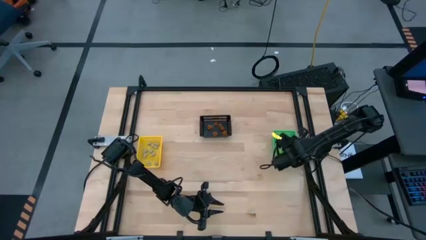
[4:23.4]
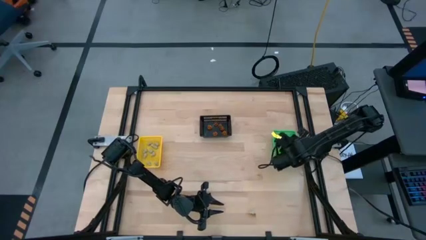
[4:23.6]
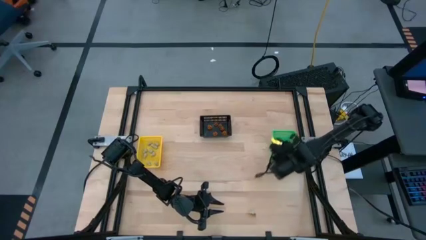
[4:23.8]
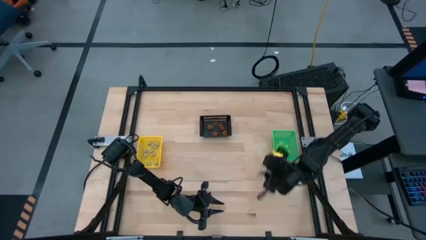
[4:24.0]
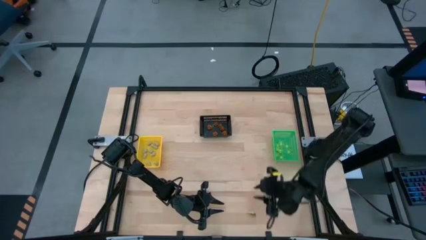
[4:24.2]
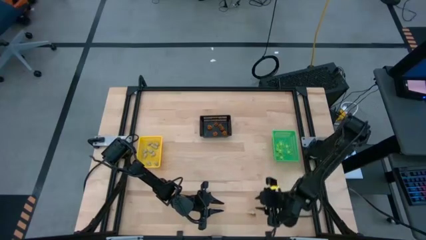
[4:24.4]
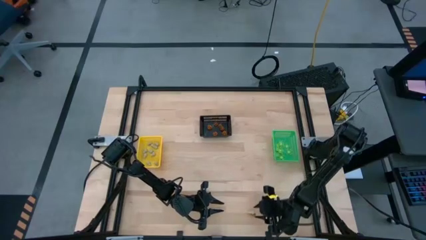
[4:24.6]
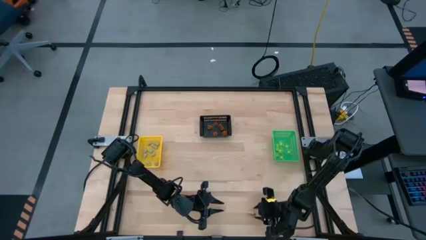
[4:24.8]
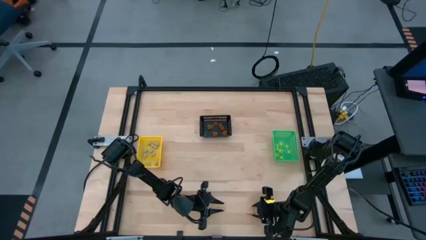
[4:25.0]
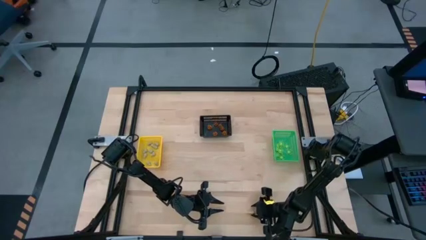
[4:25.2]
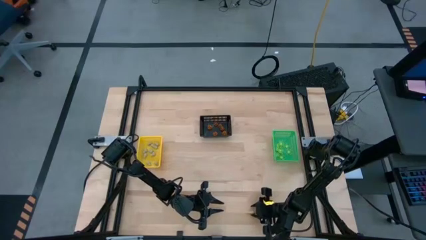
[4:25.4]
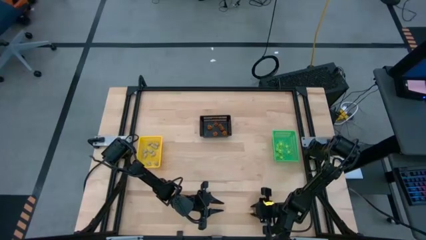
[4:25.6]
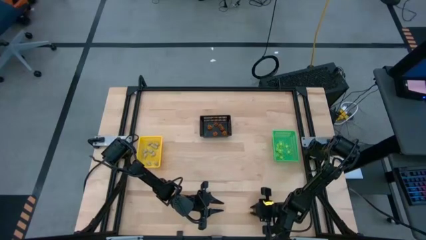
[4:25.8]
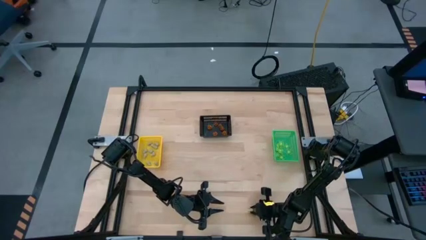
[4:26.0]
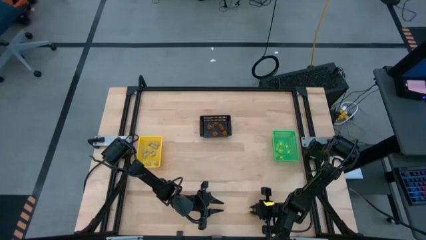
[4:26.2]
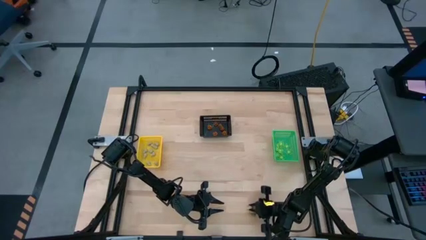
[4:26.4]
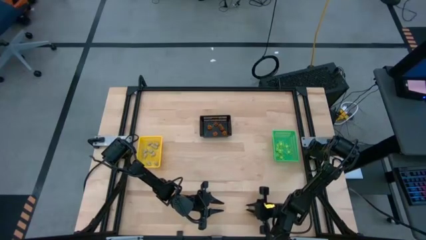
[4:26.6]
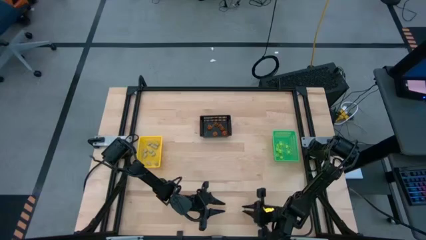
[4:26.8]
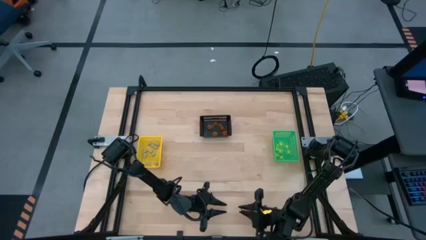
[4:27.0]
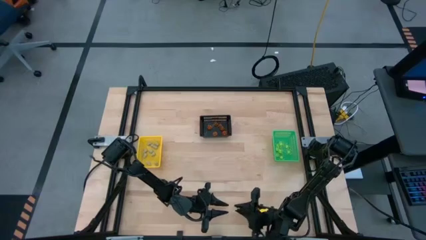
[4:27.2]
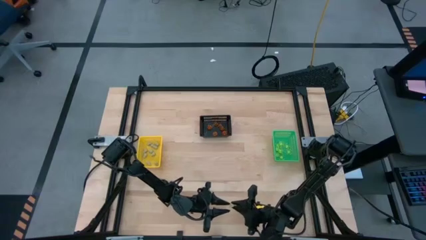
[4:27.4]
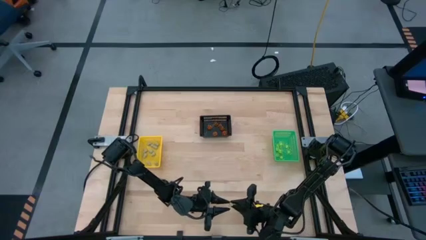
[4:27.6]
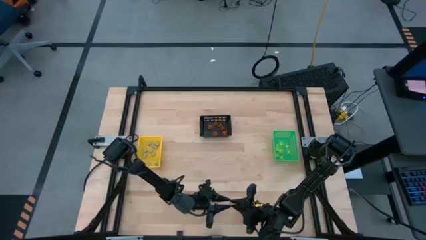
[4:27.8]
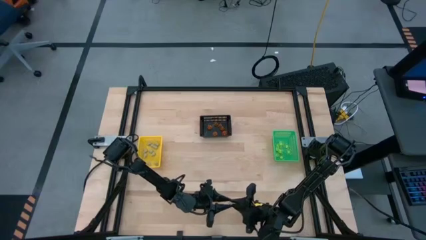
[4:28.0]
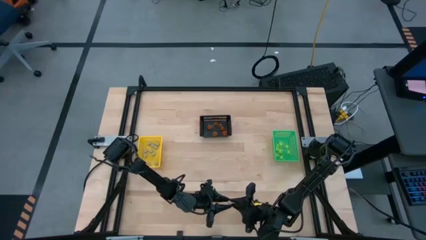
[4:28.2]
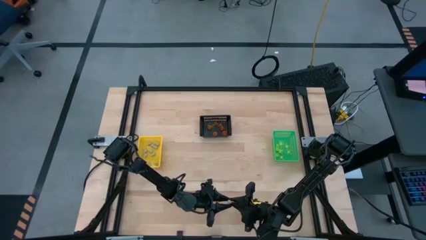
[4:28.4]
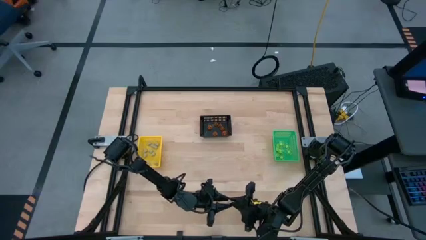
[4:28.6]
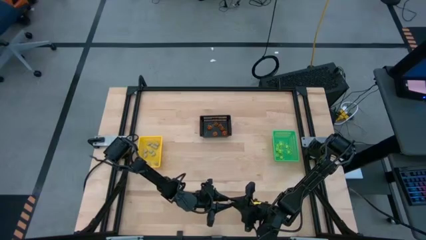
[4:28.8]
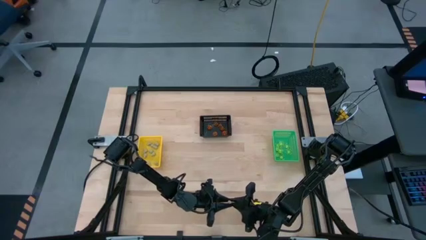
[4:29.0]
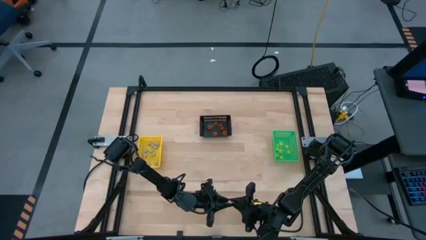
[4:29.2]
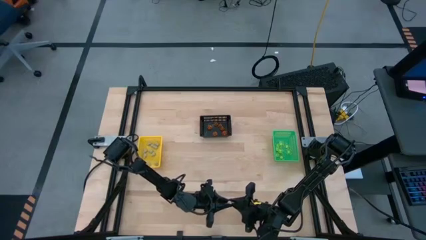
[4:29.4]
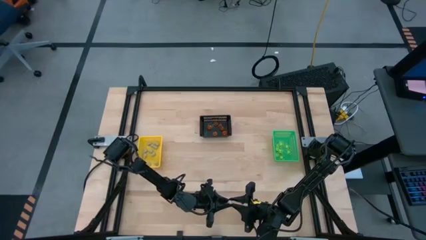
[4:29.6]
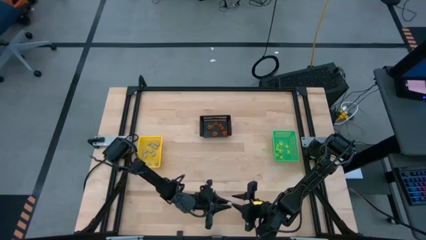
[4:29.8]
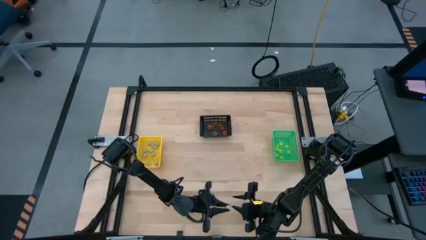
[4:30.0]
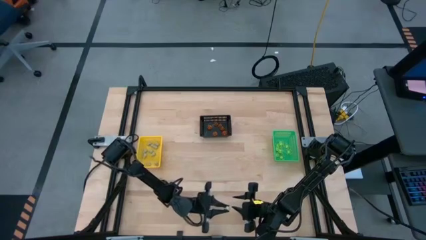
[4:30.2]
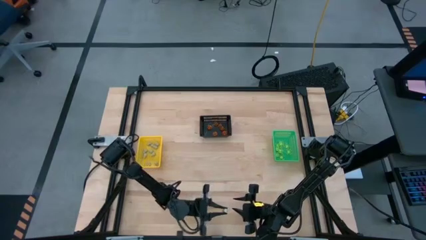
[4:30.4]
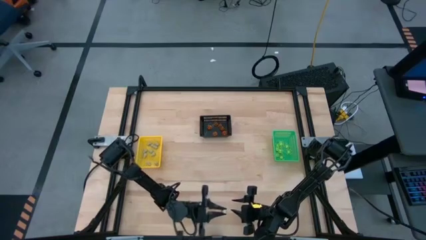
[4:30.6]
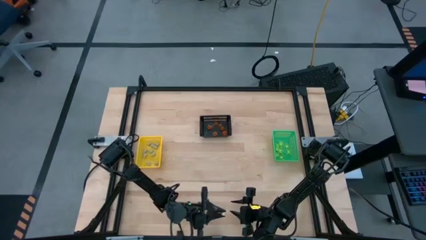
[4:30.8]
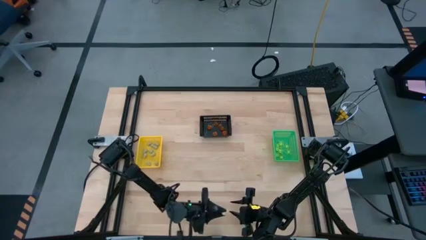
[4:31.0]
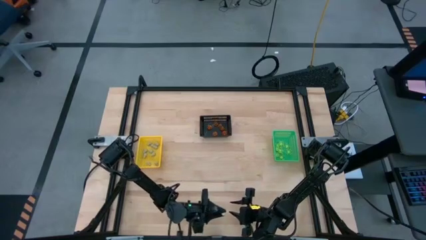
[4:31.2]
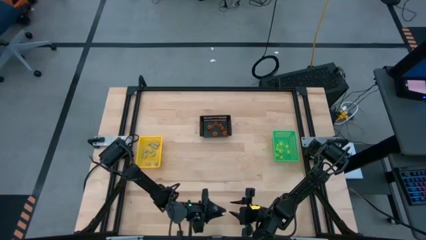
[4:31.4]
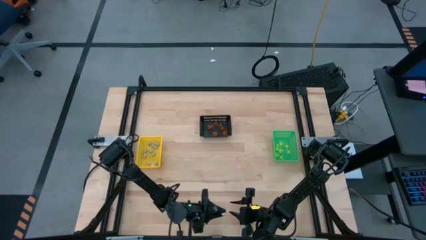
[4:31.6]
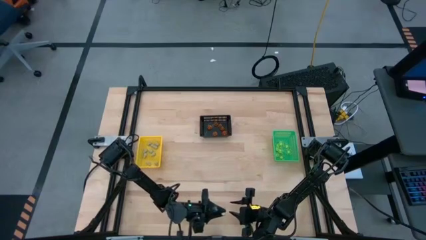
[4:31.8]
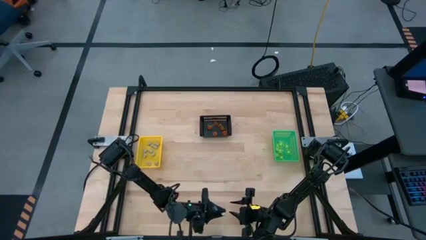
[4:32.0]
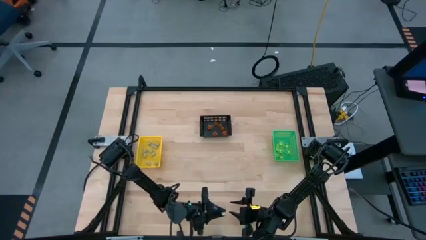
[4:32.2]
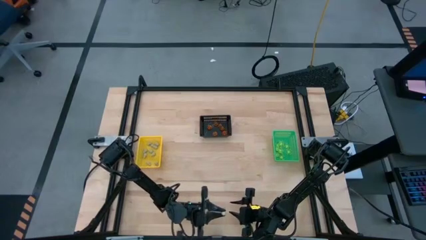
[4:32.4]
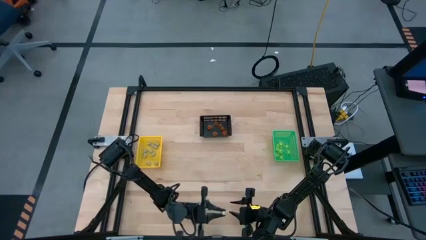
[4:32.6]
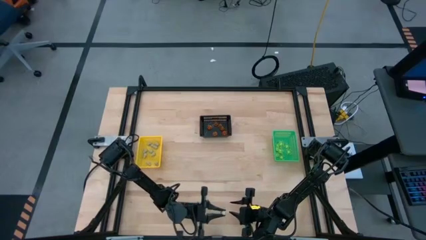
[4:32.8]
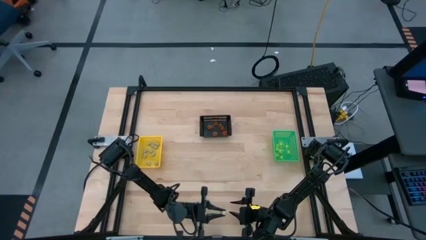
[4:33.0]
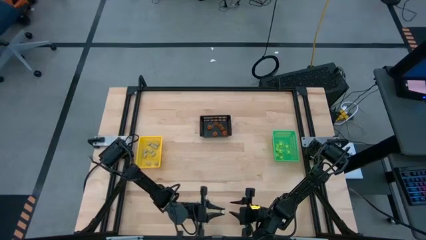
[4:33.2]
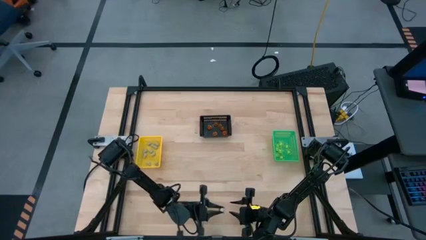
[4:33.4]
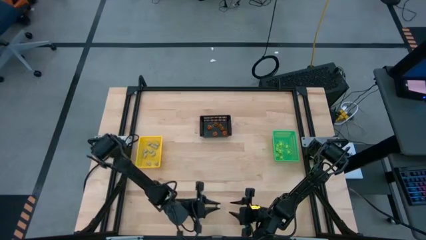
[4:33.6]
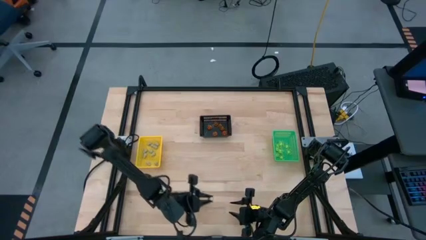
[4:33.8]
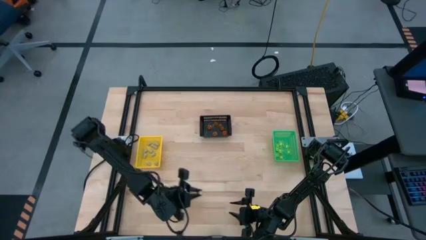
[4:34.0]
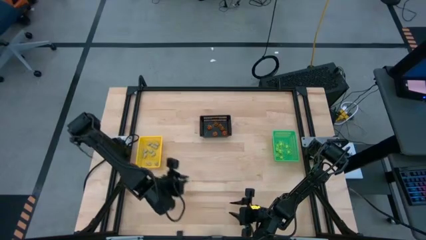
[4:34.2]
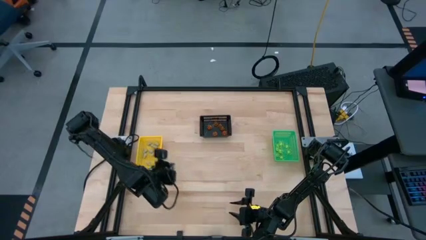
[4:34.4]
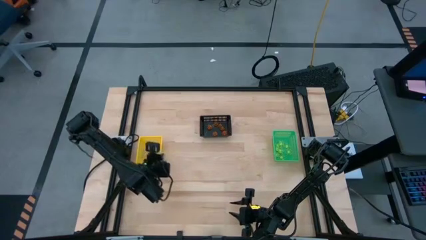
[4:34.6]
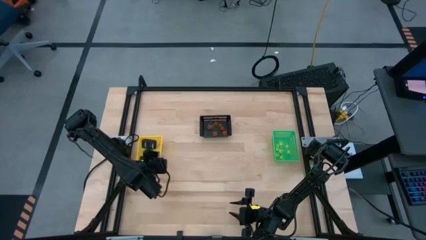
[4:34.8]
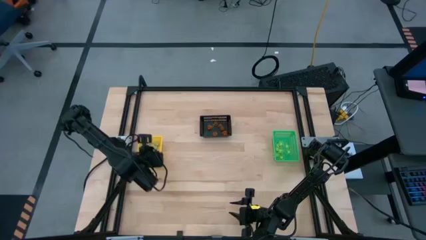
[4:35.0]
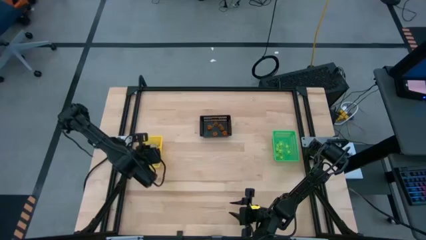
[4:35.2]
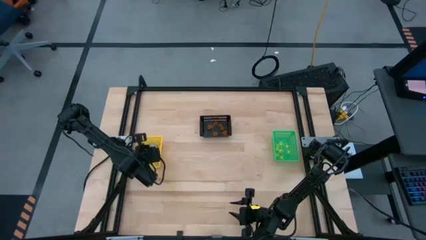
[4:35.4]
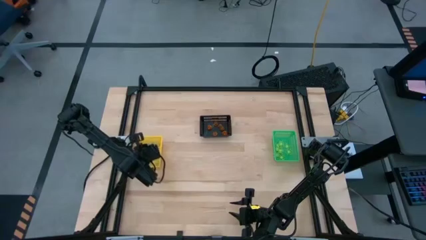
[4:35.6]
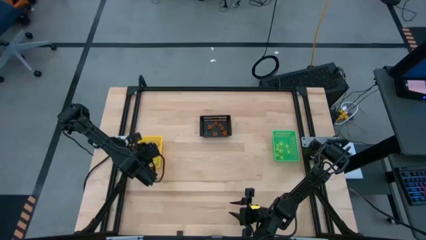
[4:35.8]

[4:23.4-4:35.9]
Task: Sort Halloween decoration
Put the white skull toy into the yellow bin
